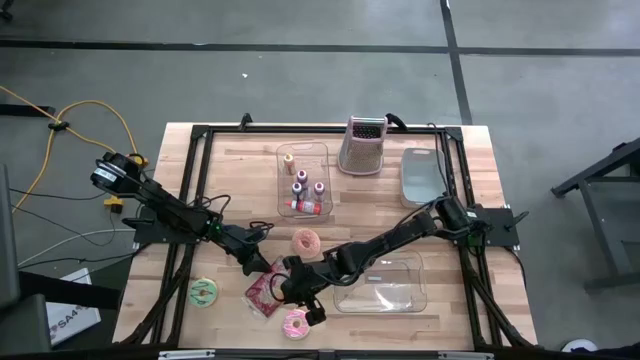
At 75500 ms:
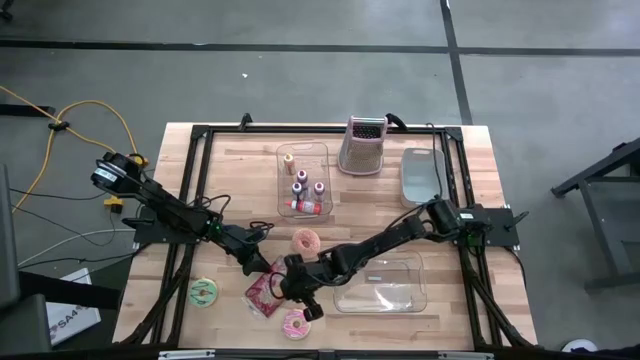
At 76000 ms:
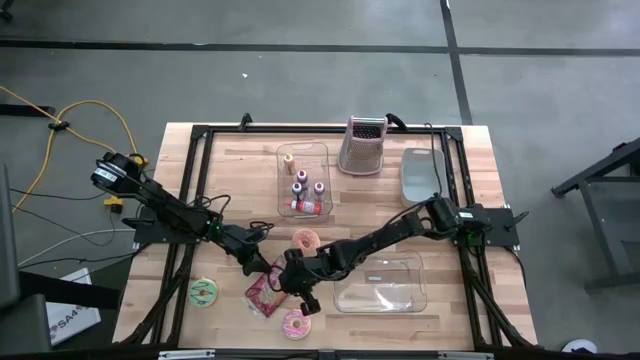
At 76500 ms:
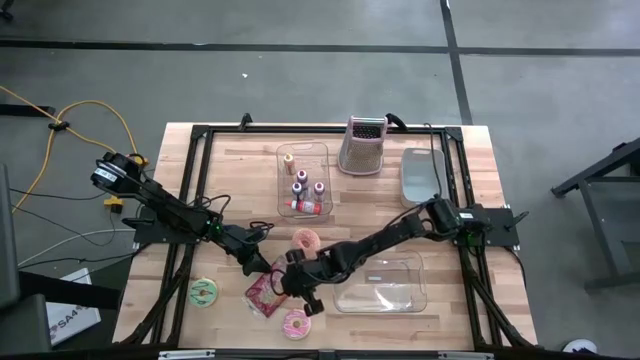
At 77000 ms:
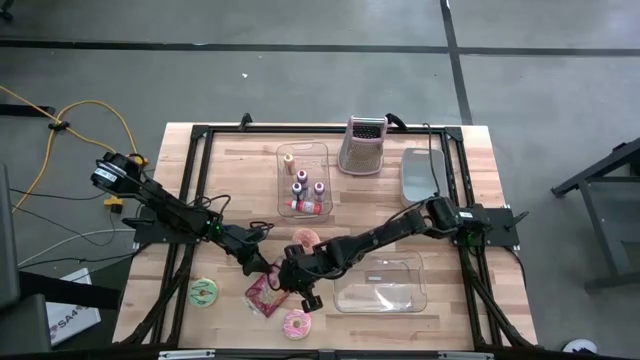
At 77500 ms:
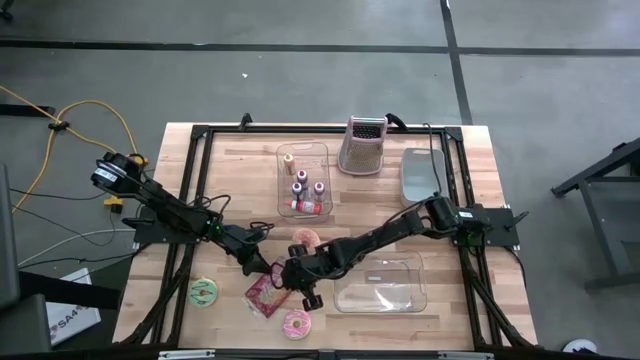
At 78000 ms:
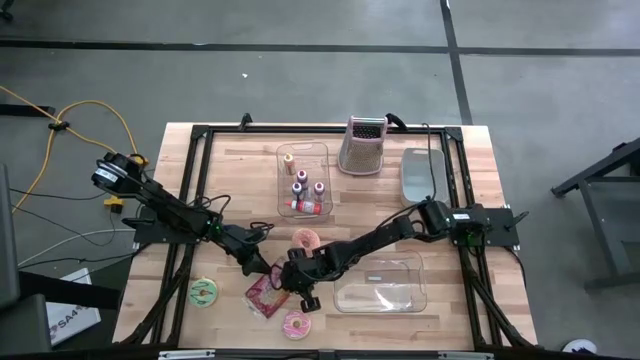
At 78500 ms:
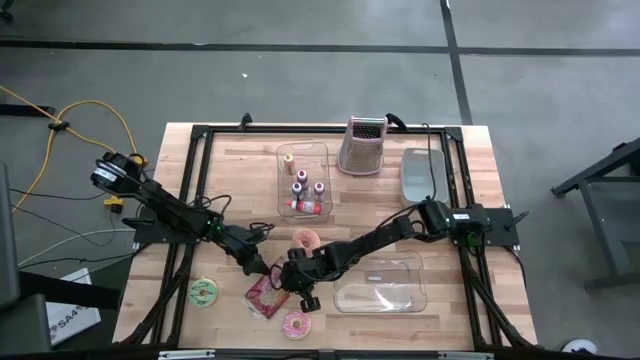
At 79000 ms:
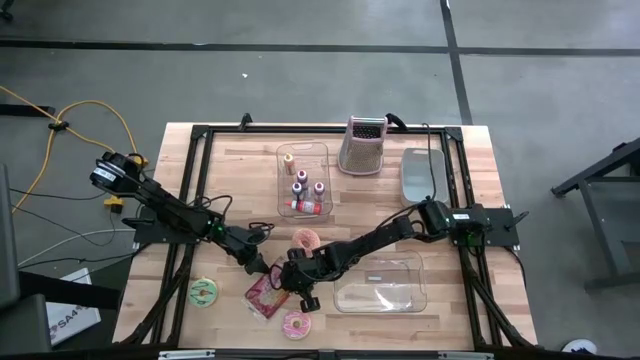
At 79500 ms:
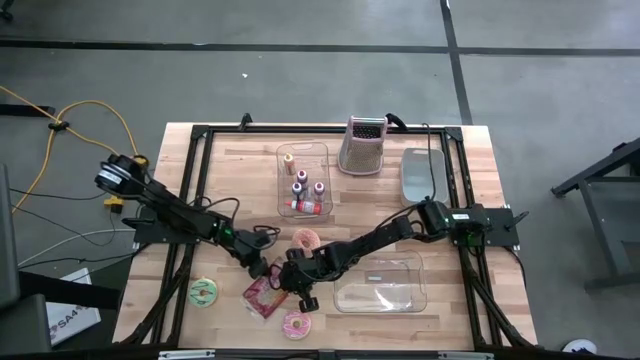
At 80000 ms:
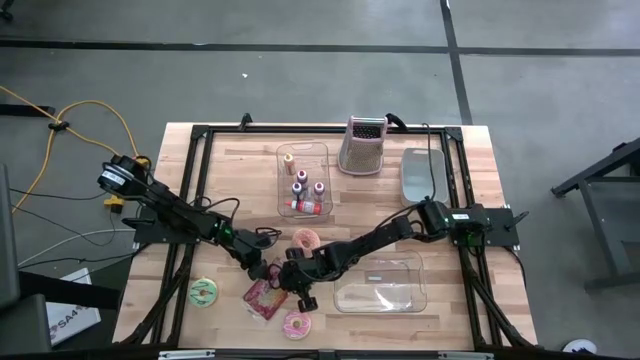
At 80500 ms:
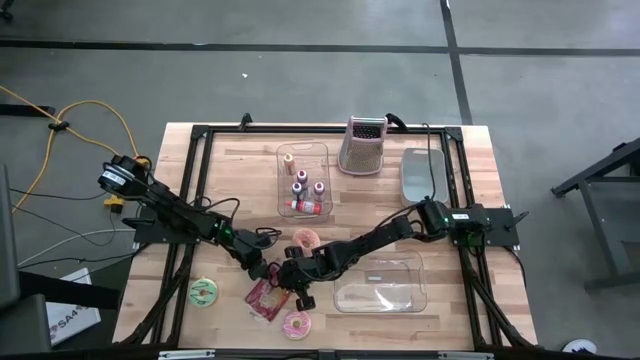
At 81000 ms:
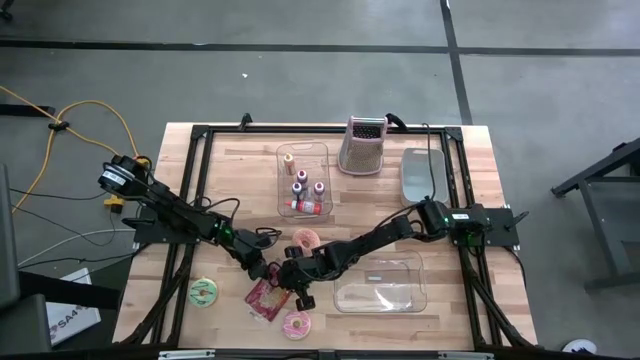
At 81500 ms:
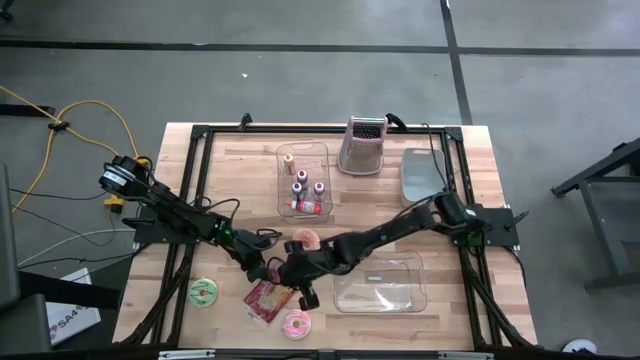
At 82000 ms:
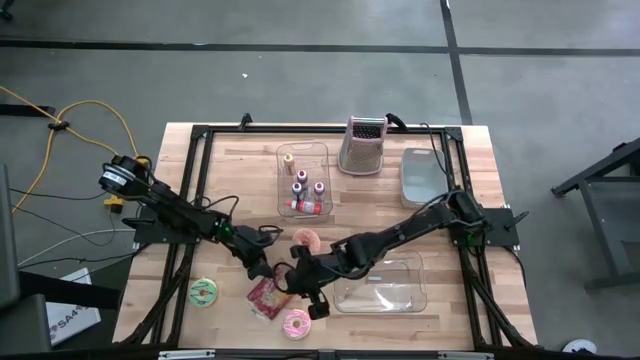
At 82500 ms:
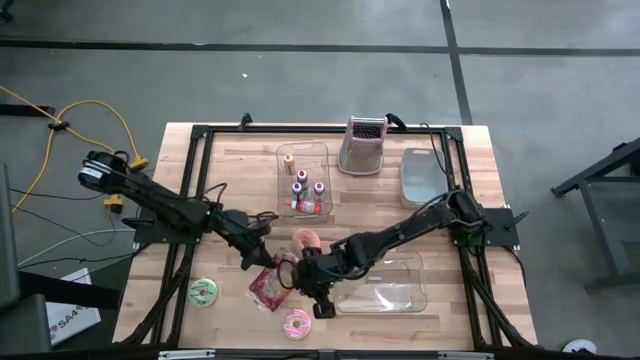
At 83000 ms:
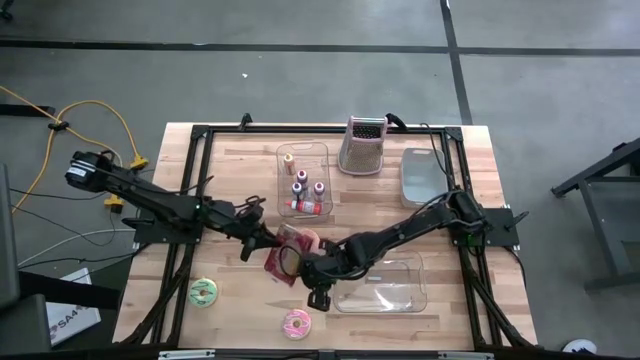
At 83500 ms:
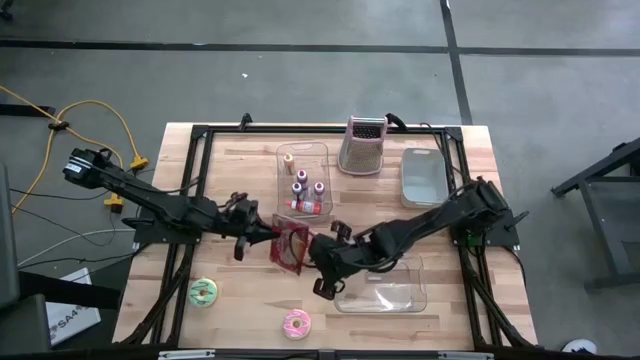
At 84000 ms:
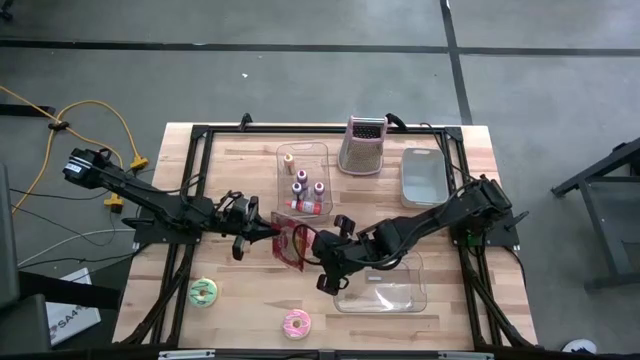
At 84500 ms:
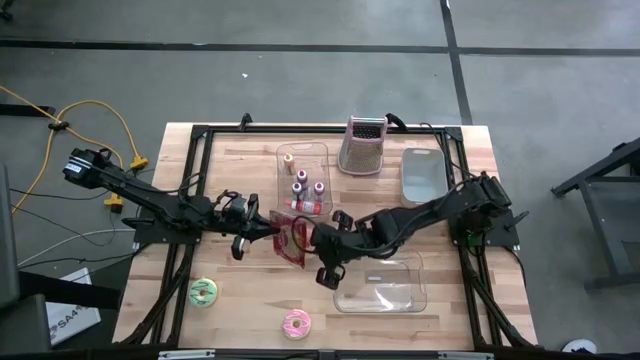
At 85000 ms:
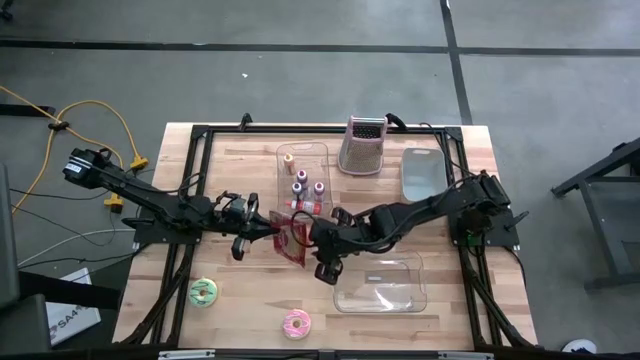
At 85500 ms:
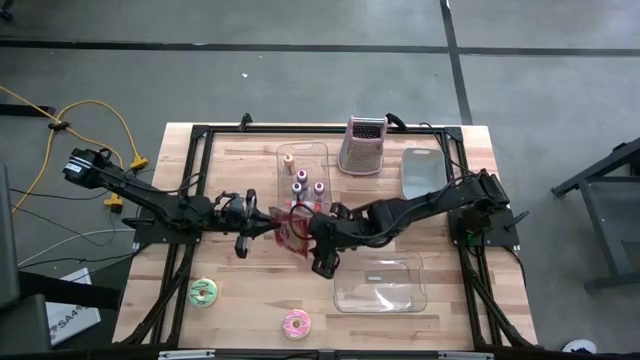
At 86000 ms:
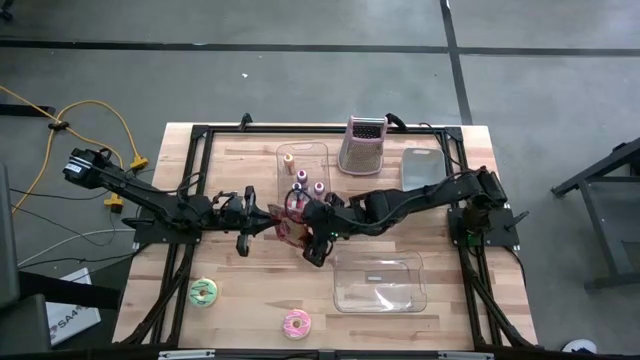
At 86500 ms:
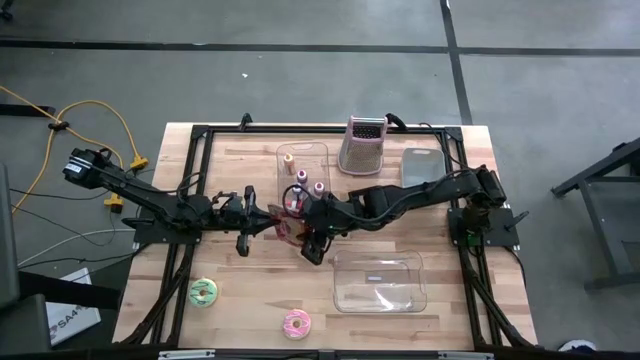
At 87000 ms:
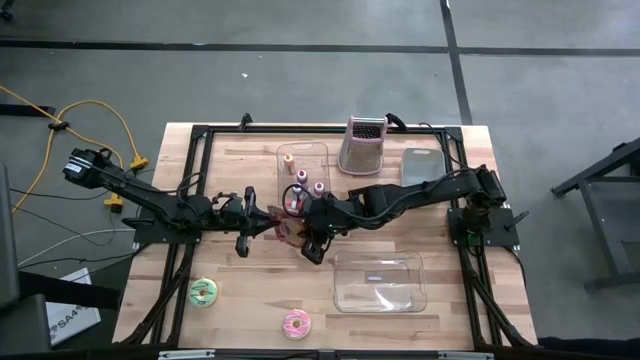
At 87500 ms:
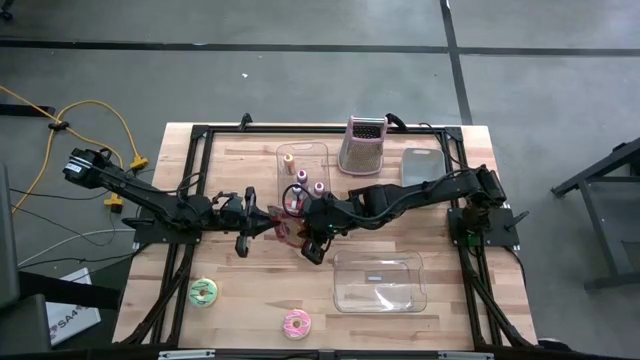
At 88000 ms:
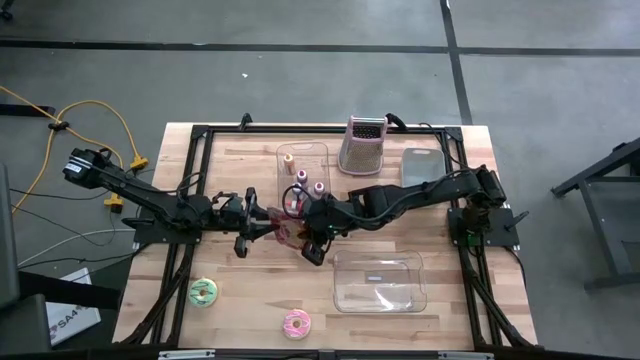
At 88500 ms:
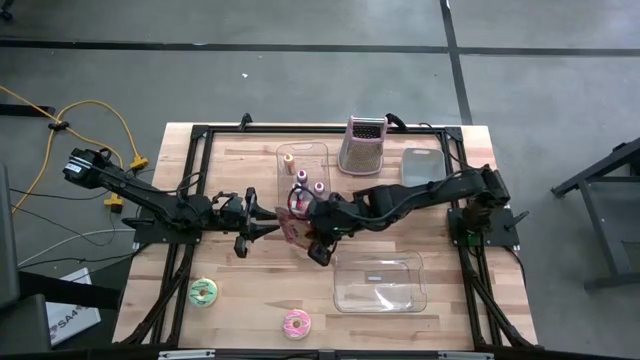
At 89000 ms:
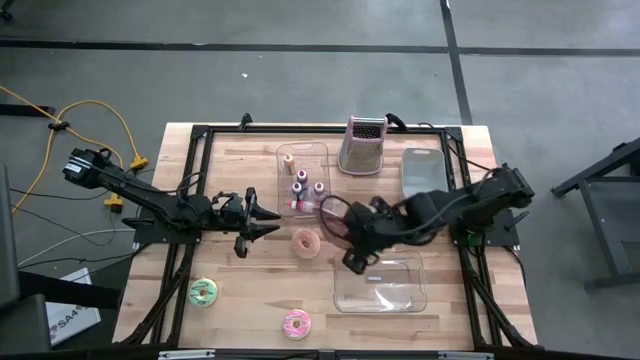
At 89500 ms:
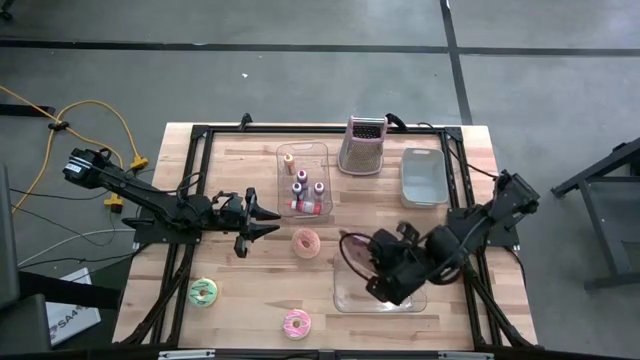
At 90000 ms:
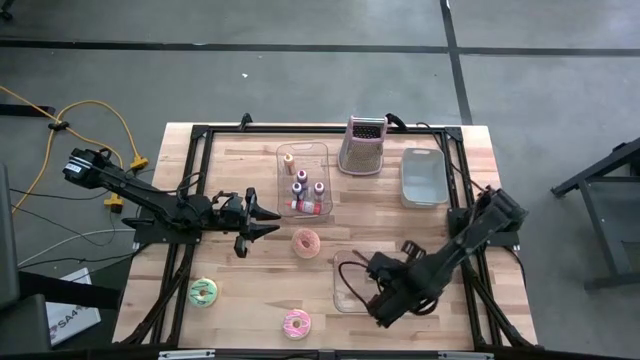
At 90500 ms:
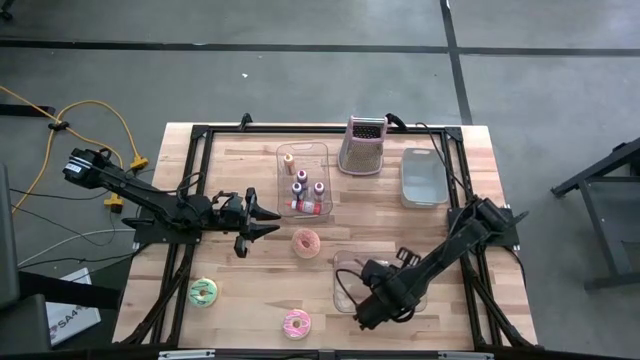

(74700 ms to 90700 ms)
Put the popcorn bag into the bottom transparent bin
